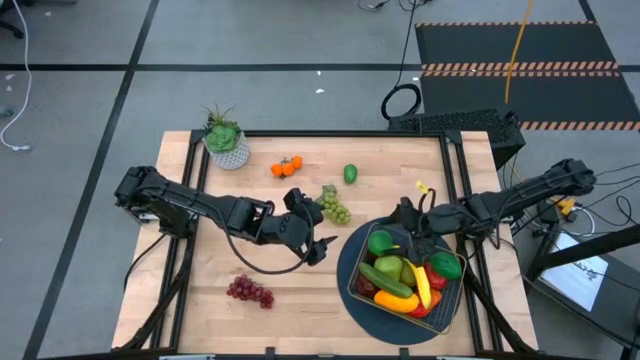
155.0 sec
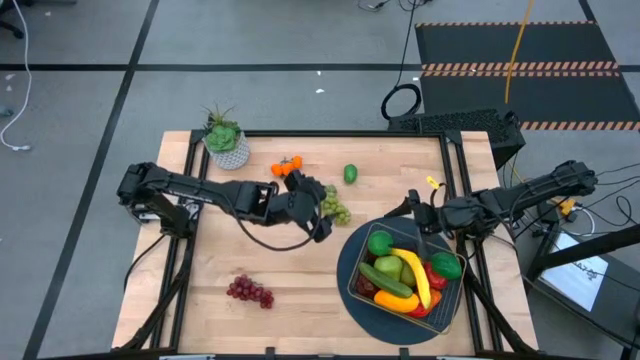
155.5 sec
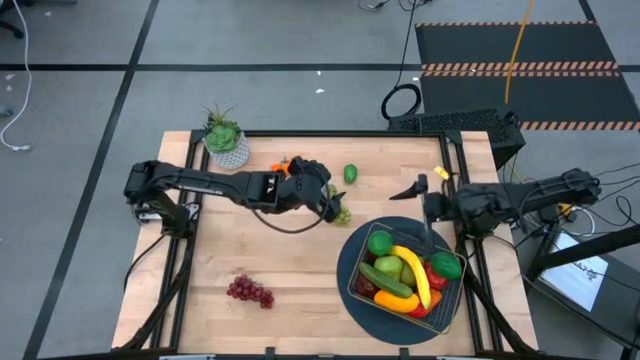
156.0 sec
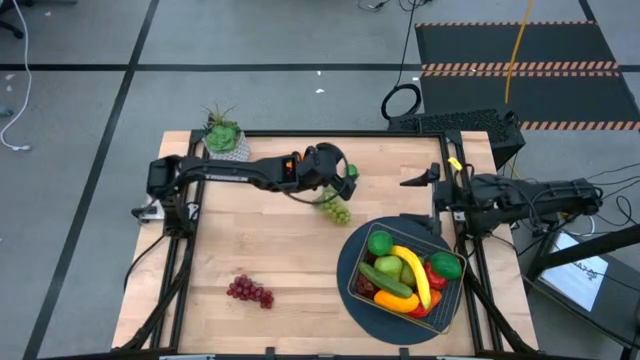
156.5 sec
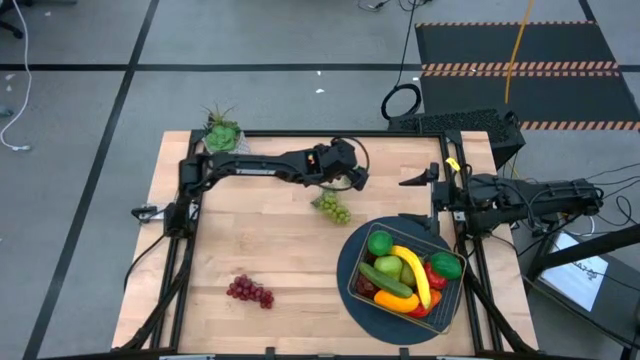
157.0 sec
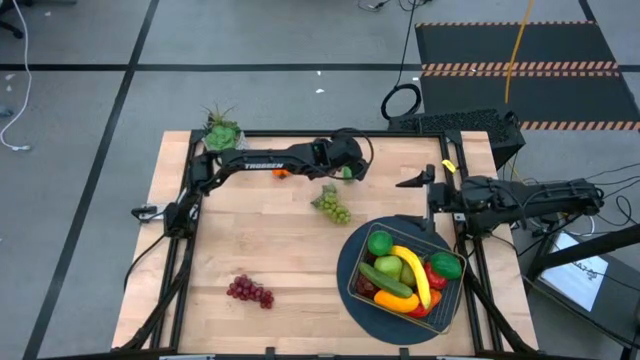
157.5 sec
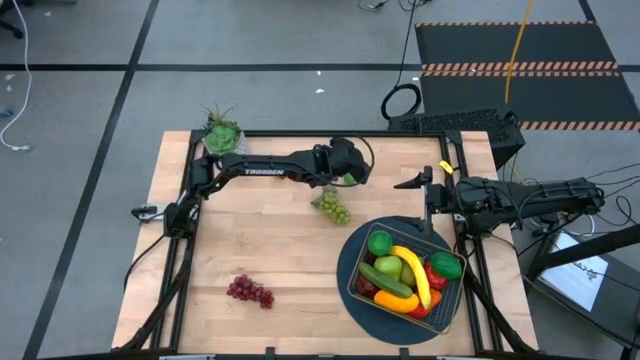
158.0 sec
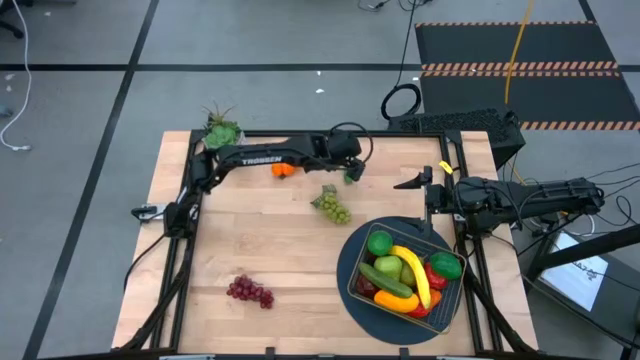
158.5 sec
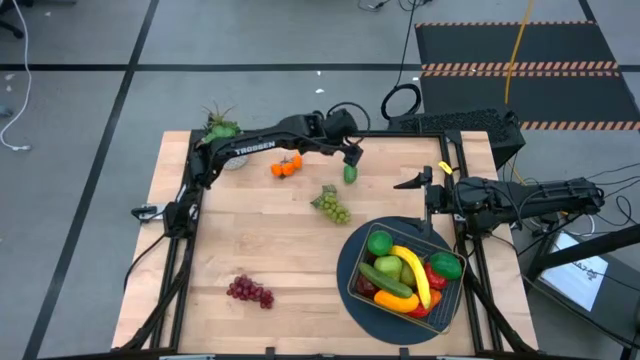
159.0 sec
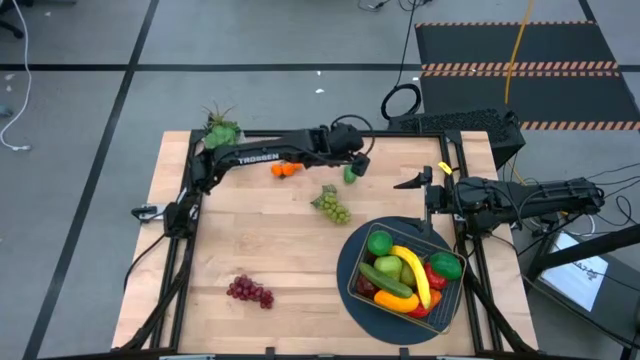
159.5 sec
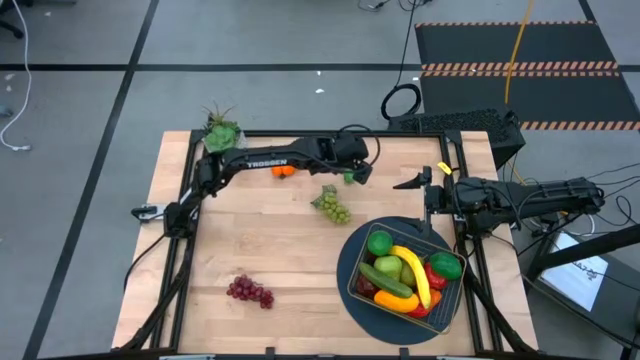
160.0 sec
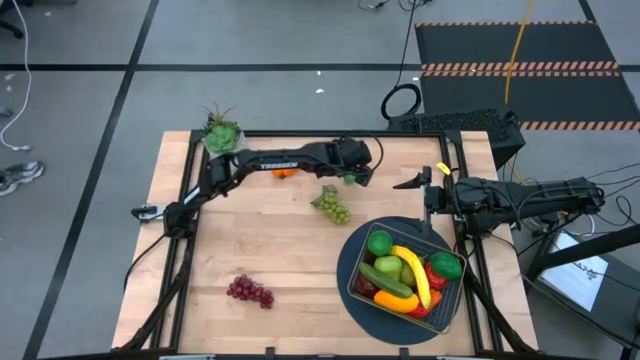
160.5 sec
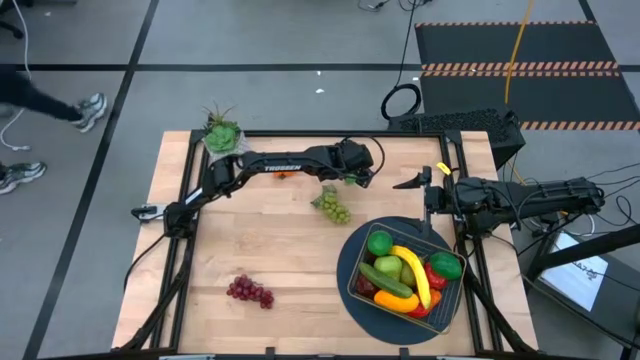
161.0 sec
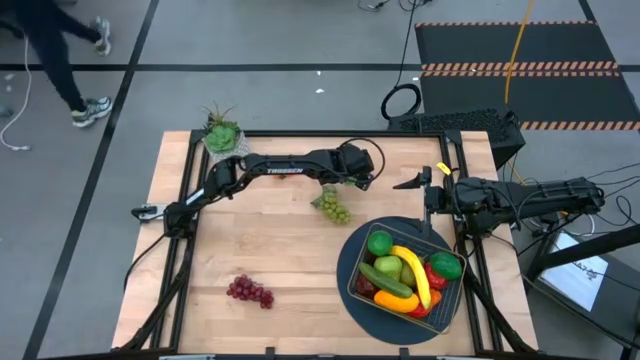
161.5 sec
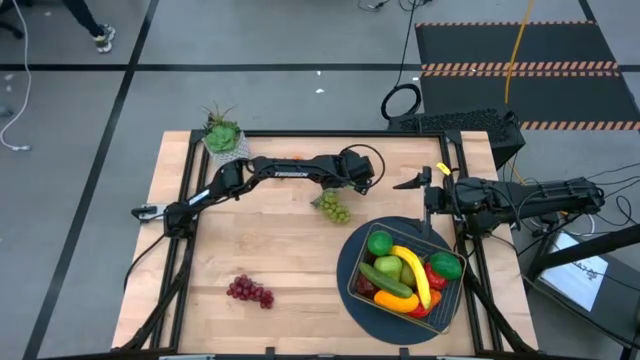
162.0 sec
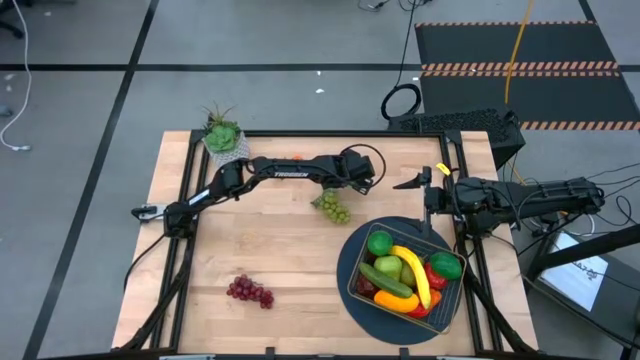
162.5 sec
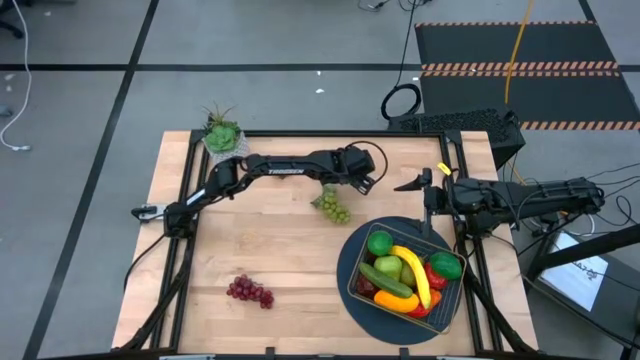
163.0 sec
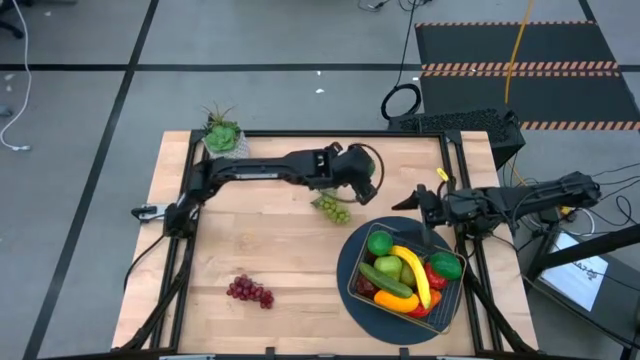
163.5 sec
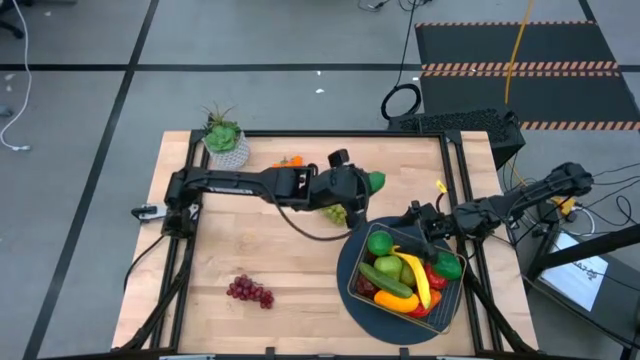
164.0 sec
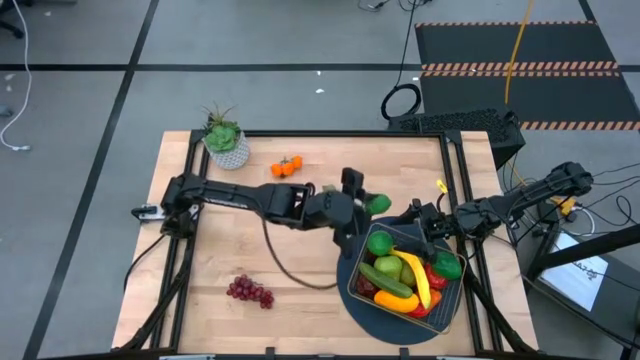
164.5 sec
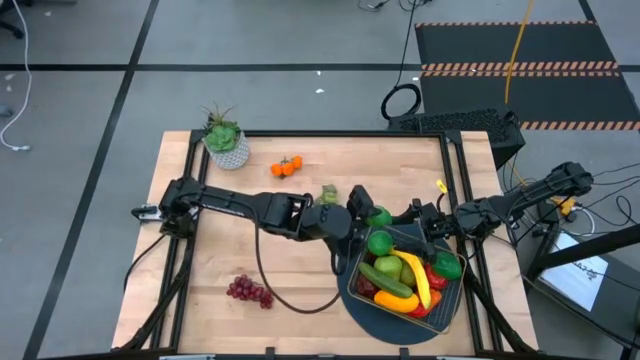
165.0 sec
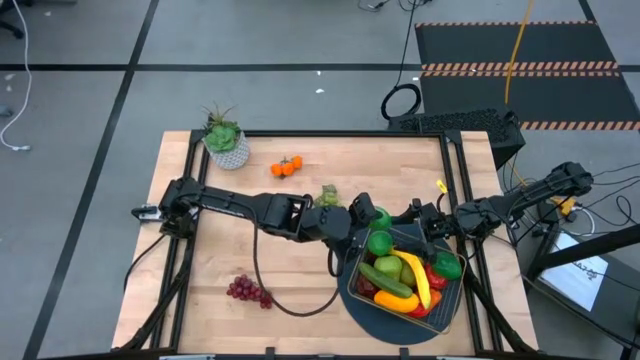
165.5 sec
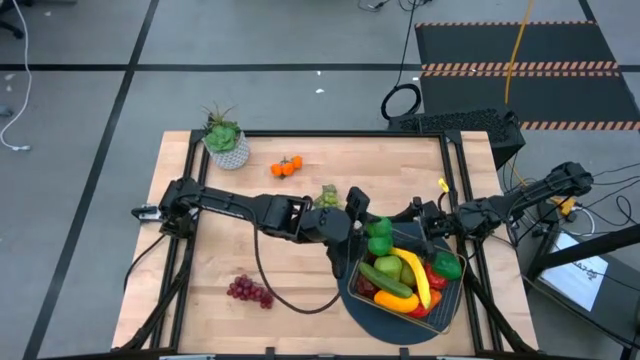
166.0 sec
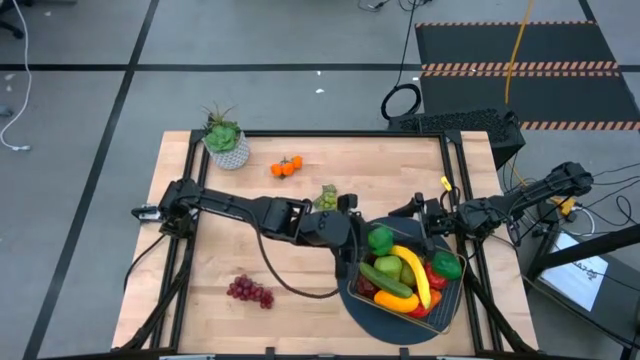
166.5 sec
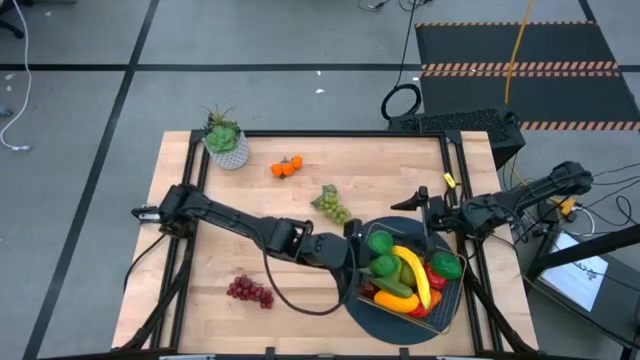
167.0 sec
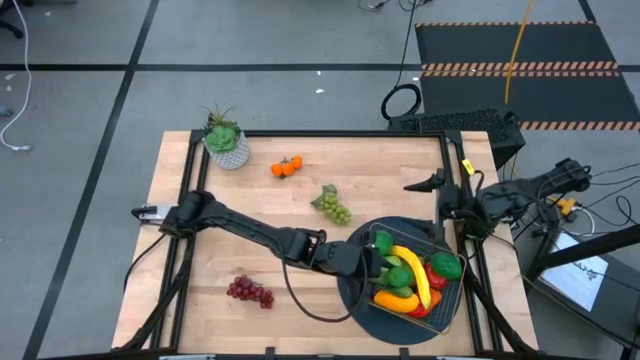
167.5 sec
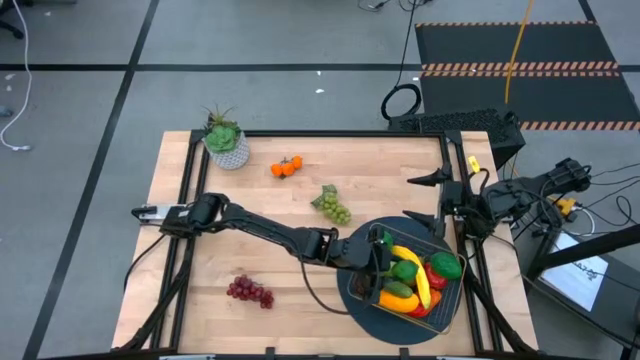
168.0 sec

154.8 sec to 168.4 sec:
Task: Build produce basket
Put the lime into the gold wire basket

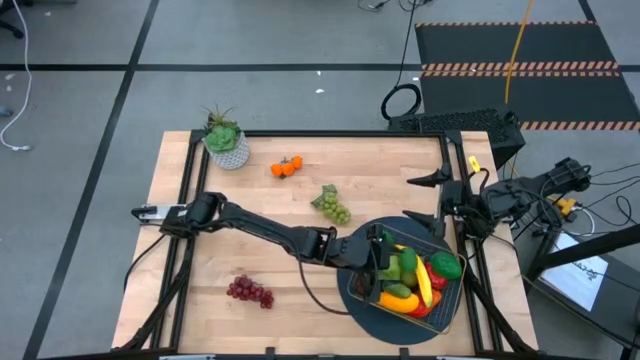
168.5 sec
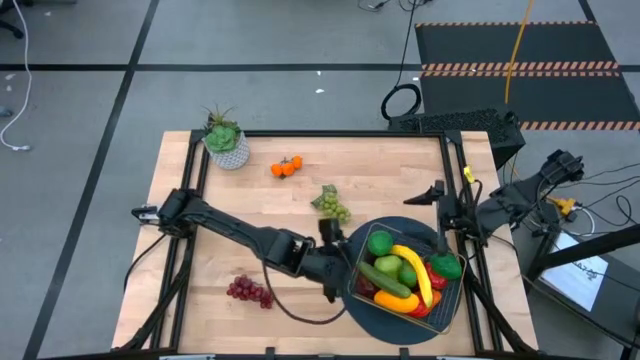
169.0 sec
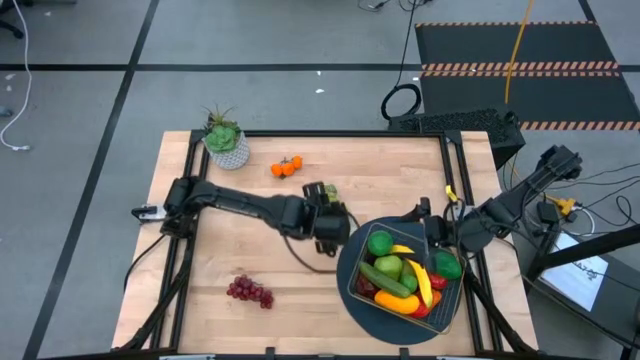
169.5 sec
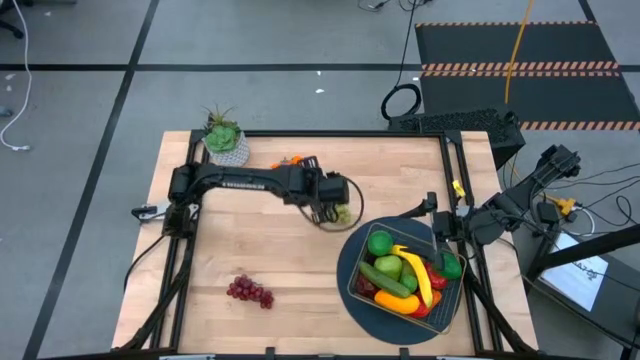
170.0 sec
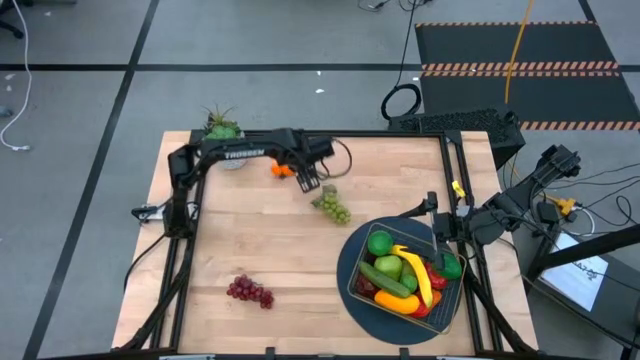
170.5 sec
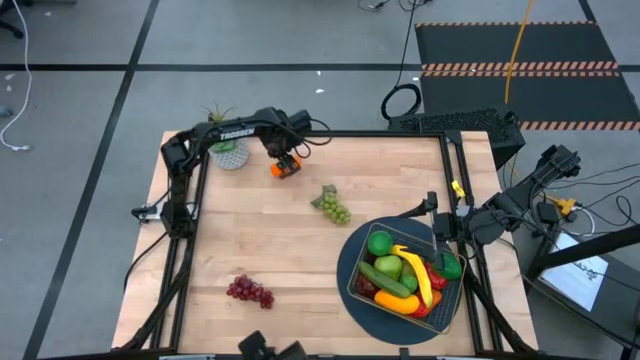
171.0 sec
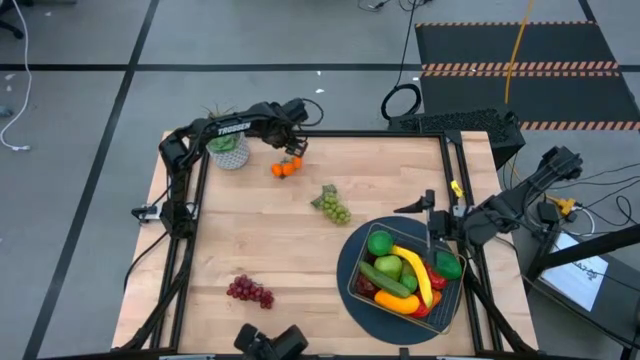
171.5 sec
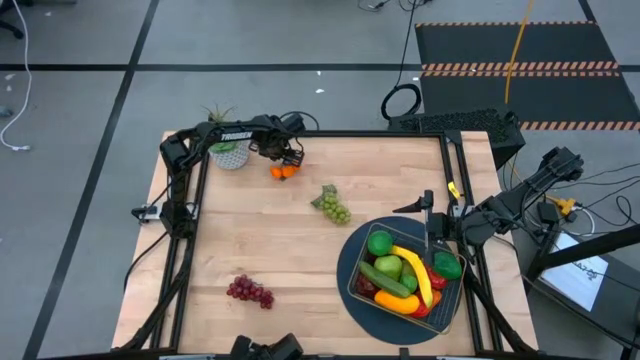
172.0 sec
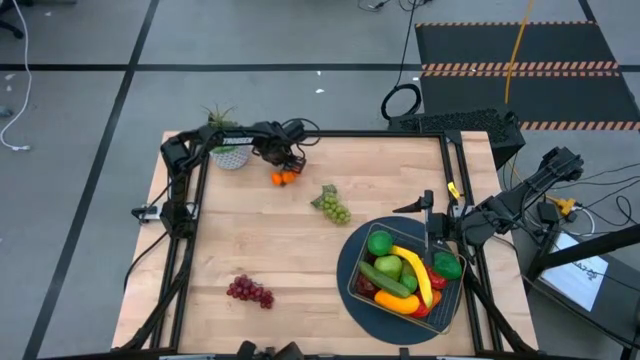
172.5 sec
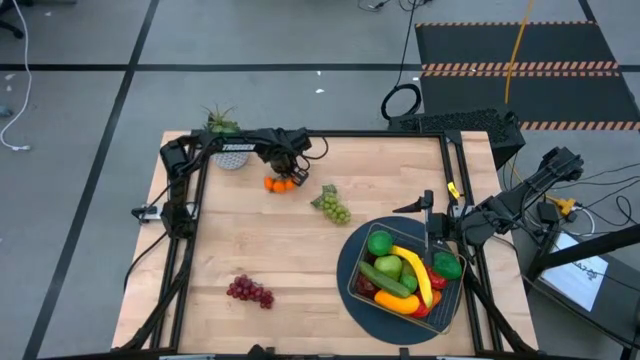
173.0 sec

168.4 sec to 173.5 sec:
Put the tangerine into the gold wire basket

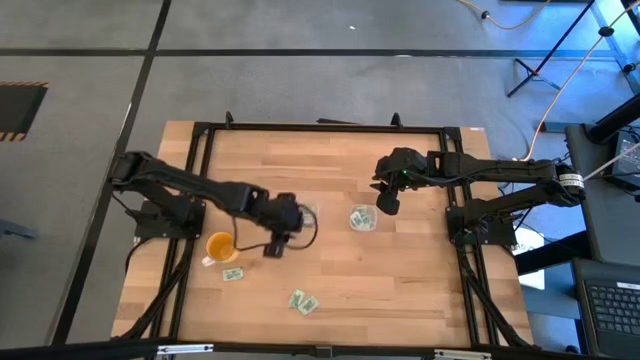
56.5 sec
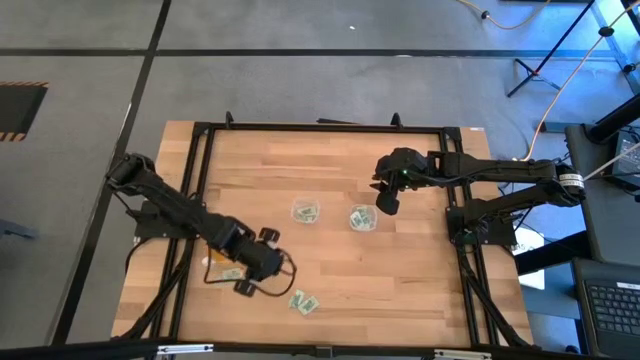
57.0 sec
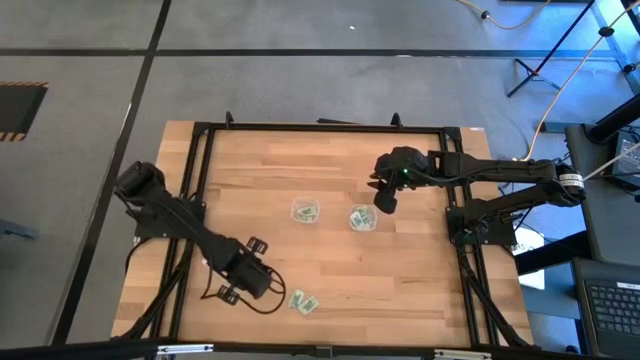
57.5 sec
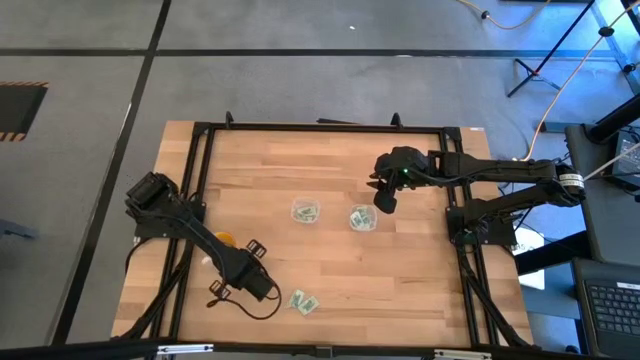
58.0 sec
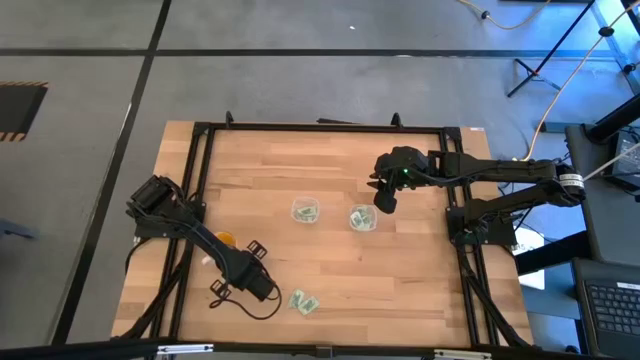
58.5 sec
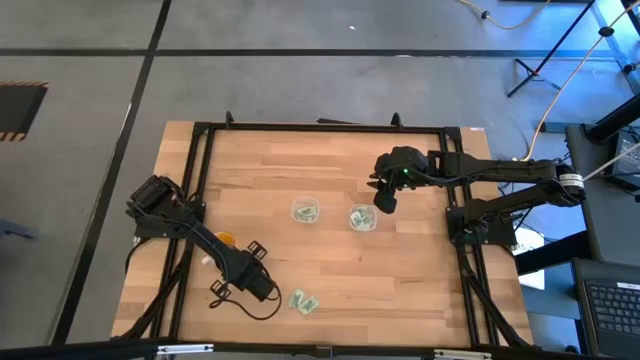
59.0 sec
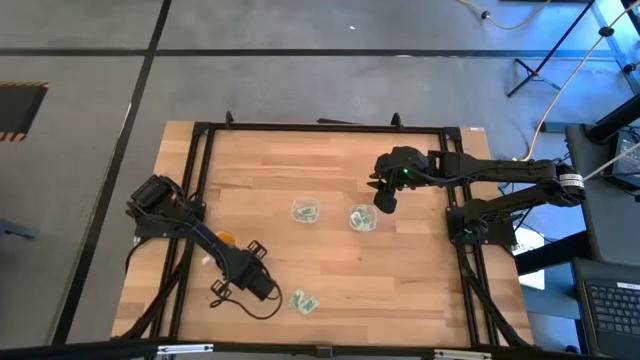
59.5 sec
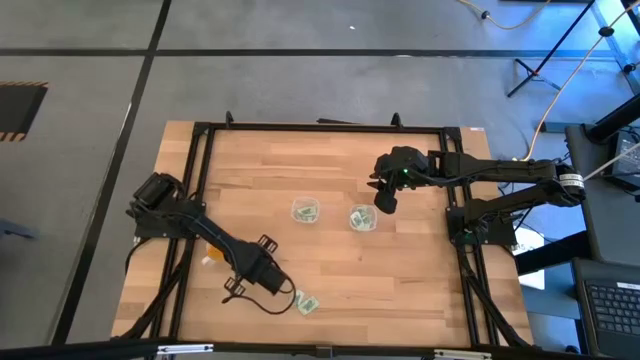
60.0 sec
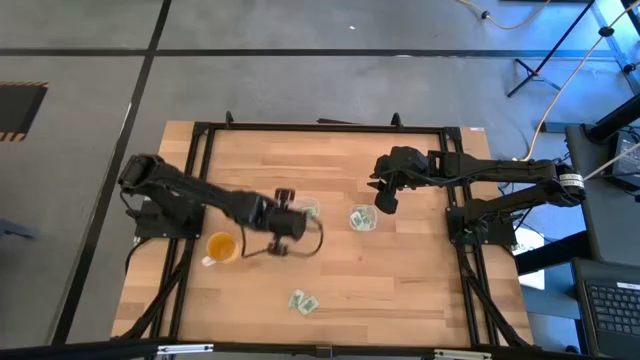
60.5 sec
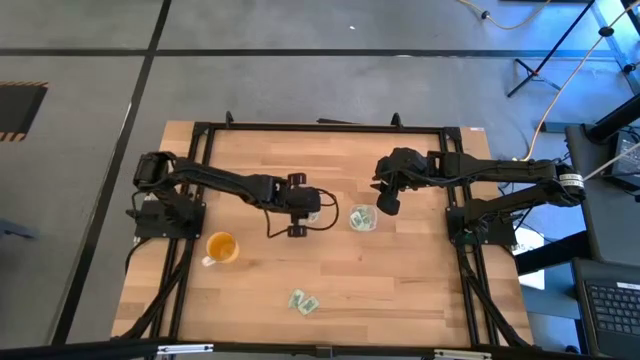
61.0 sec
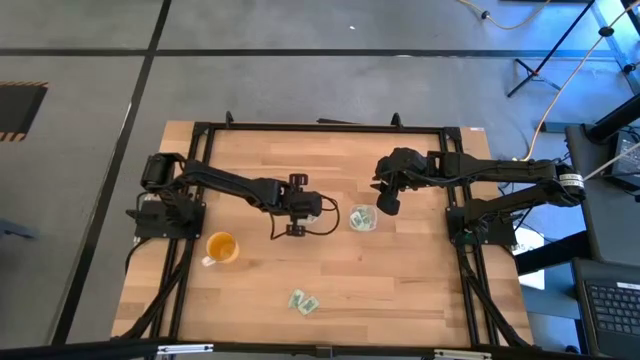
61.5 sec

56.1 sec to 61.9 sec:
Task: Pick and place Stevia / Truvia into bins
Put the top stevia packet into the left transparent container
